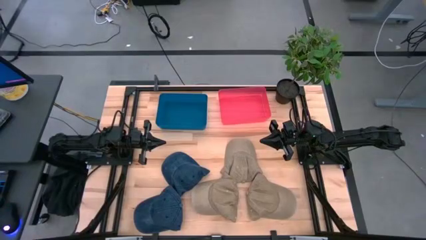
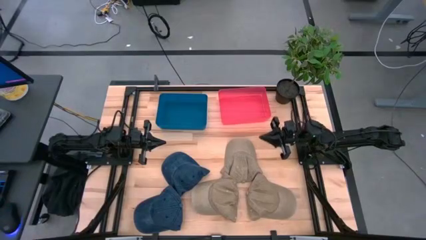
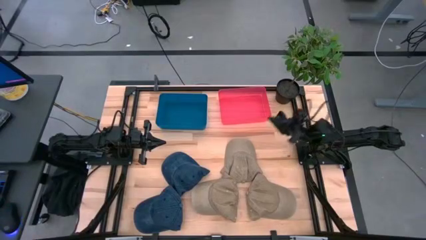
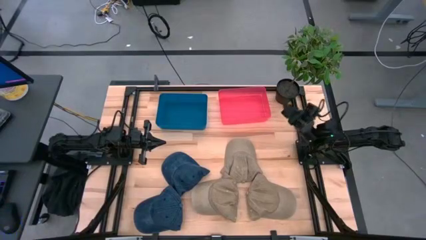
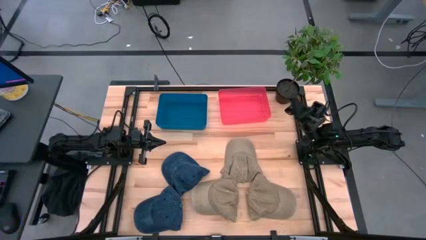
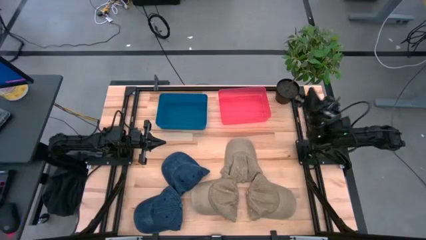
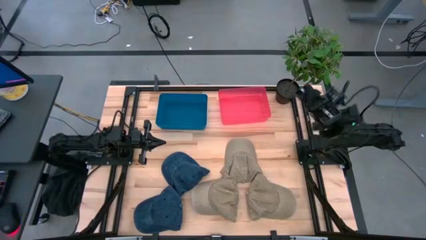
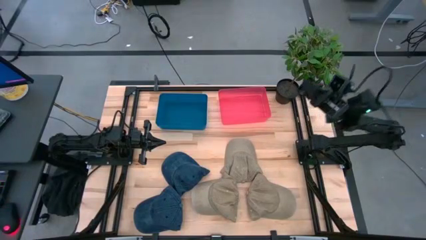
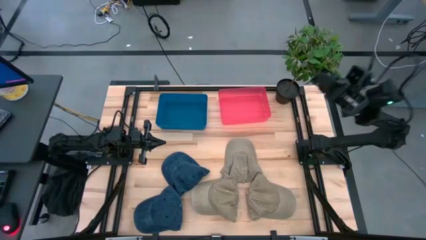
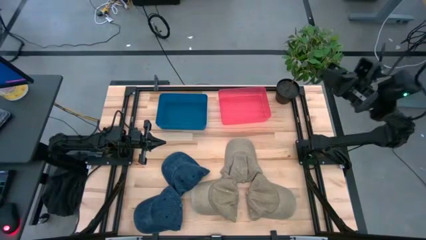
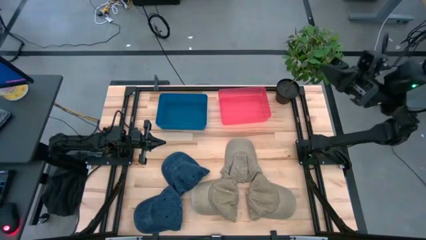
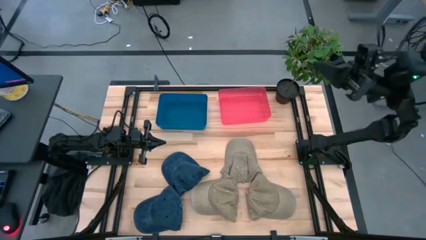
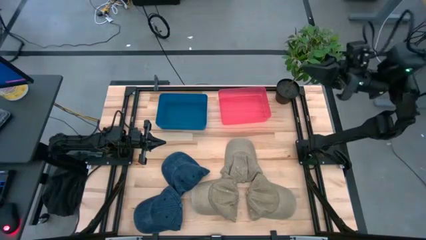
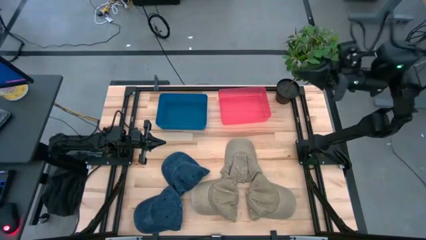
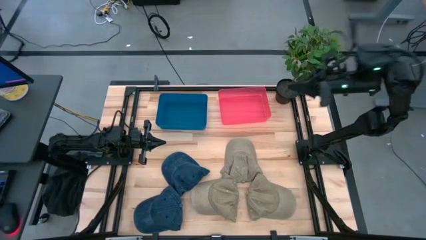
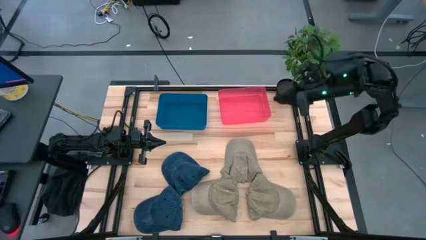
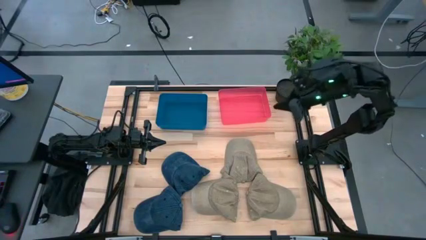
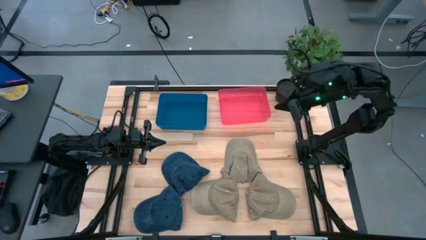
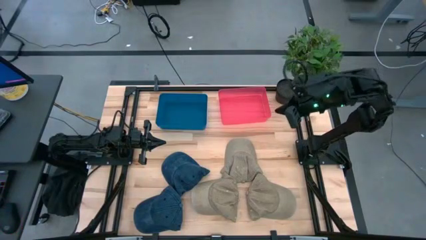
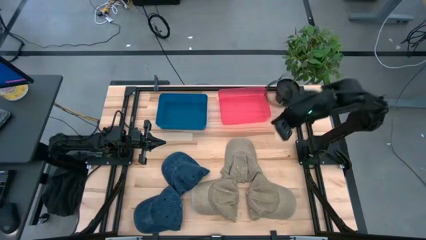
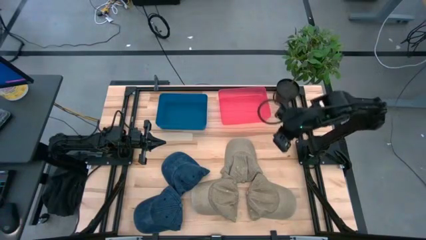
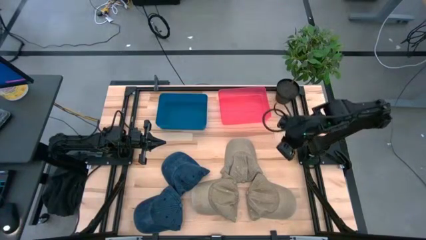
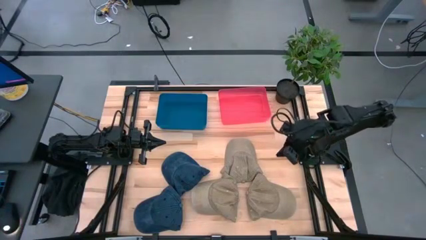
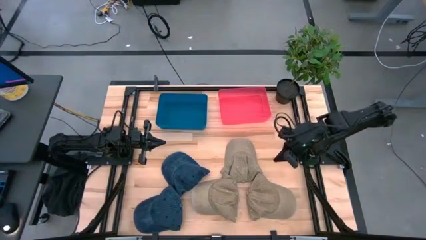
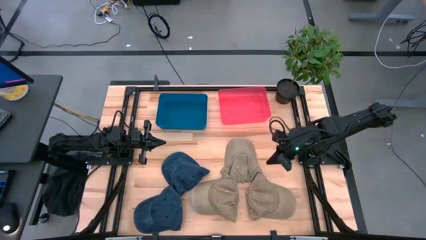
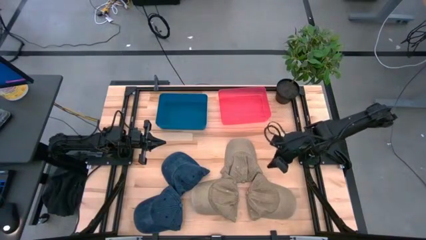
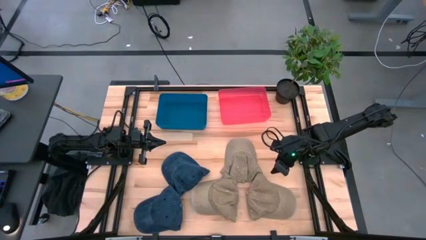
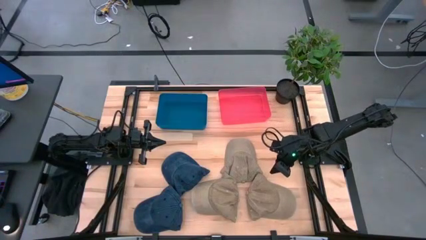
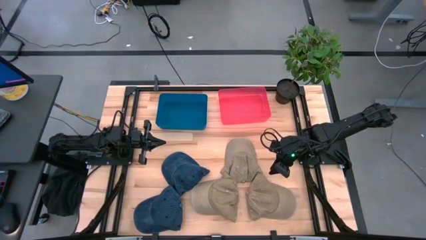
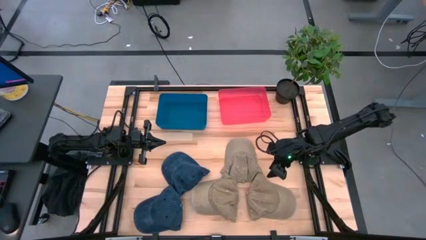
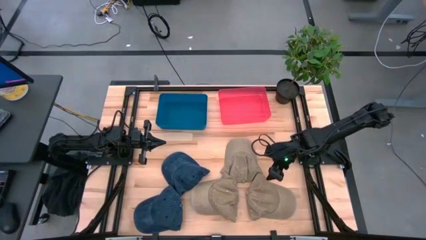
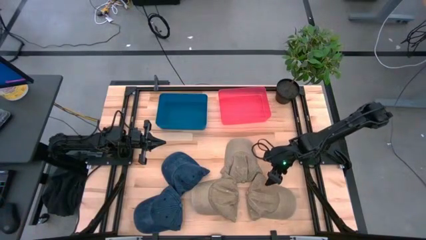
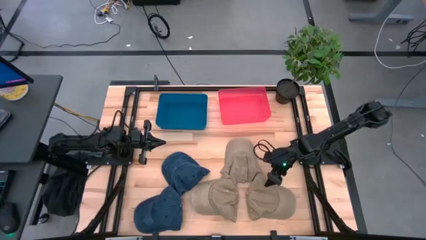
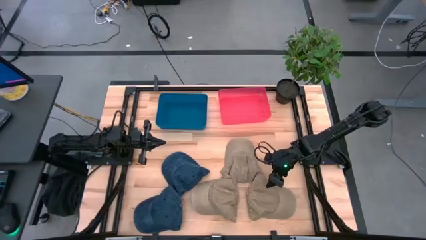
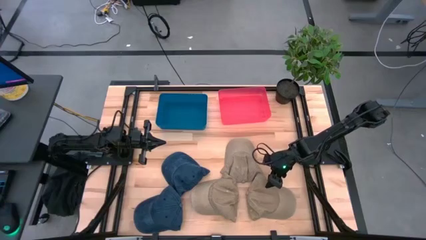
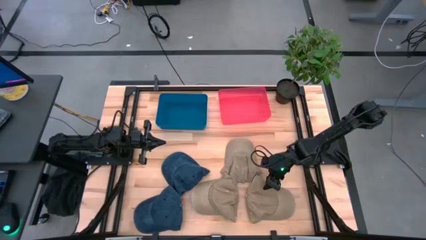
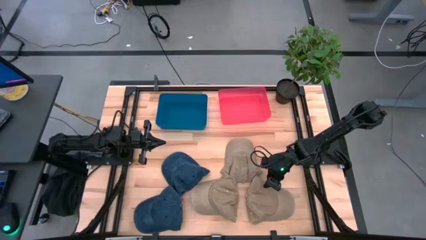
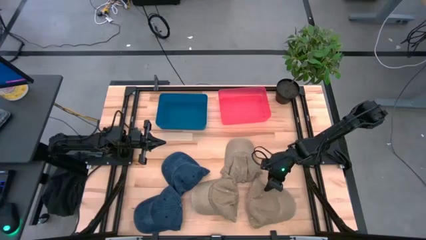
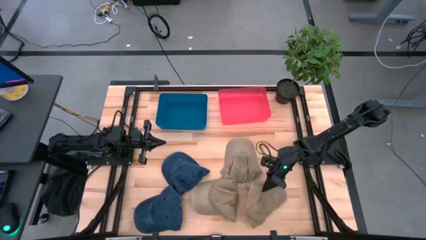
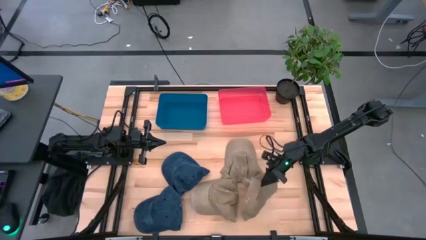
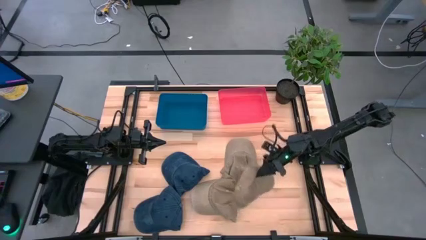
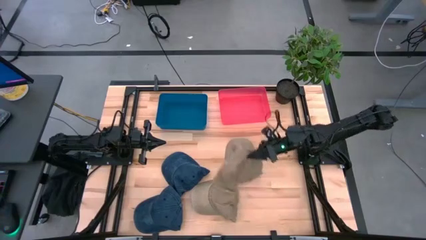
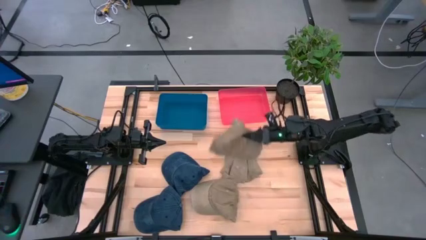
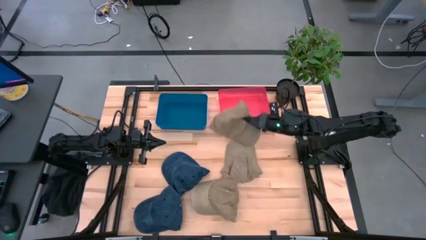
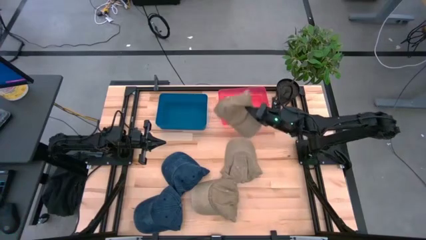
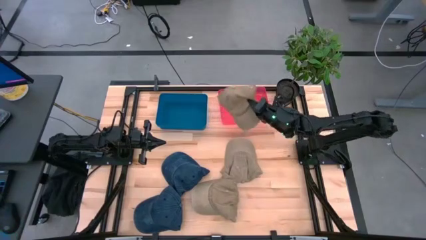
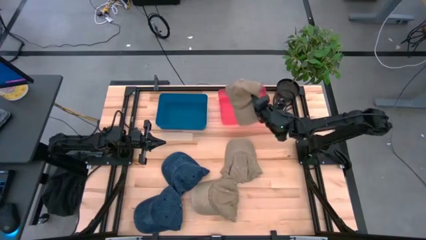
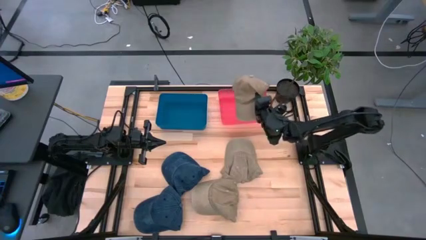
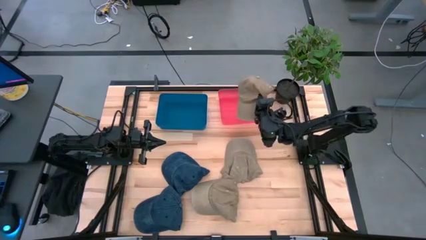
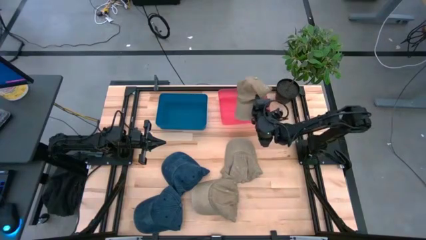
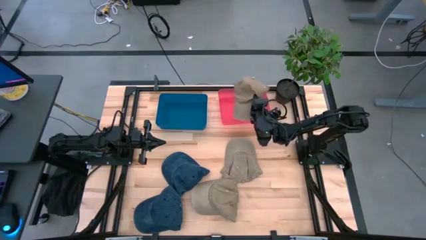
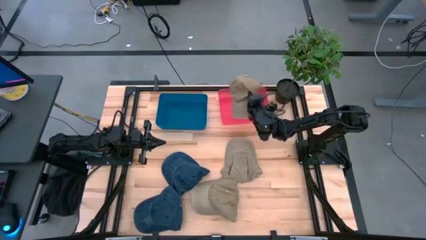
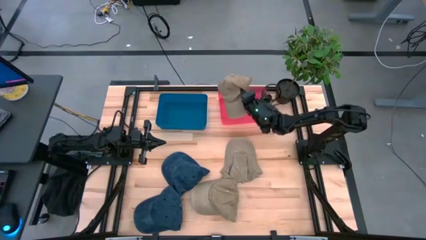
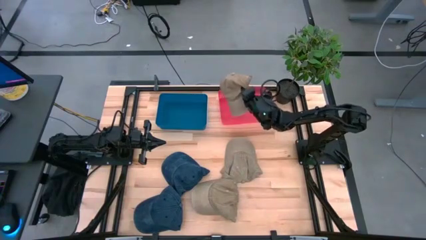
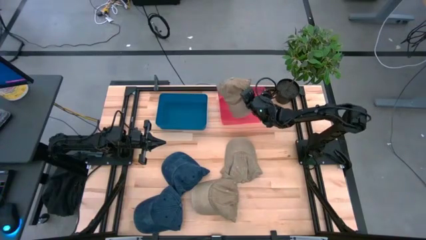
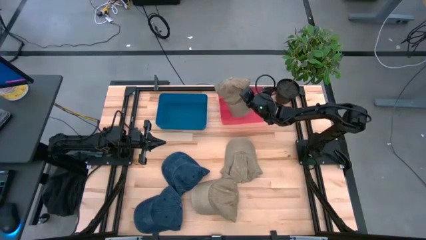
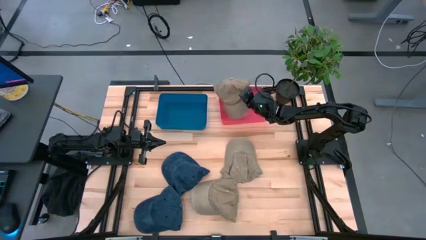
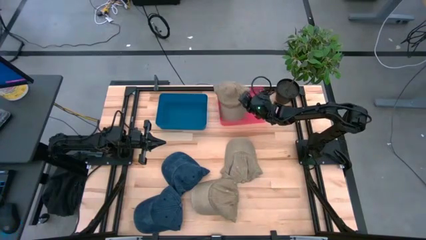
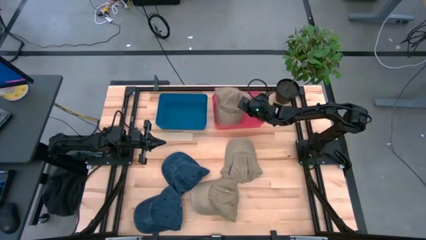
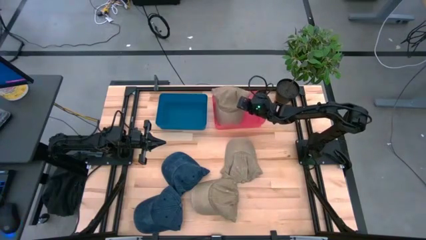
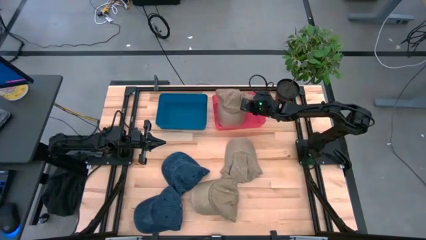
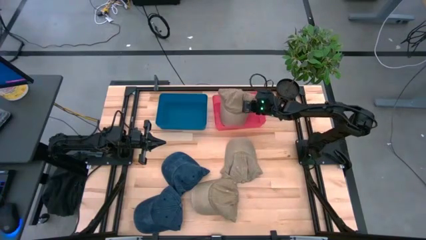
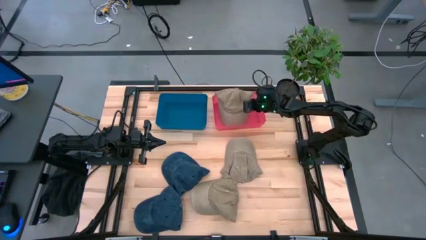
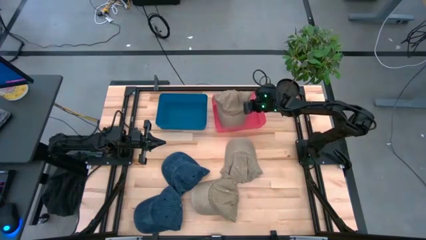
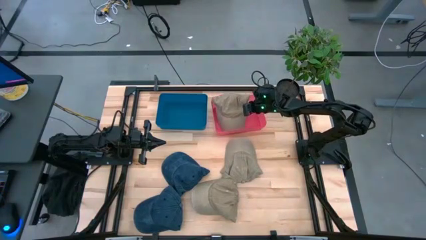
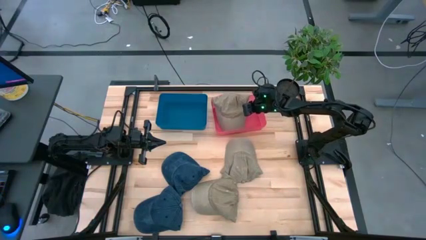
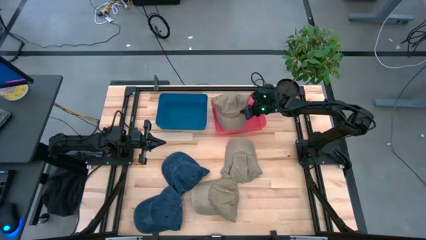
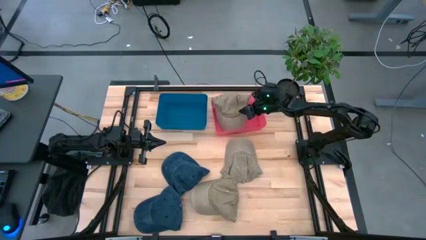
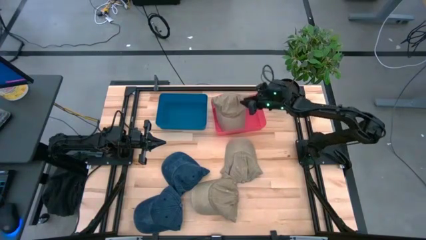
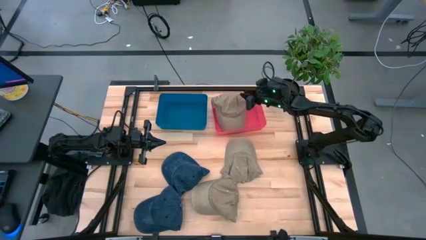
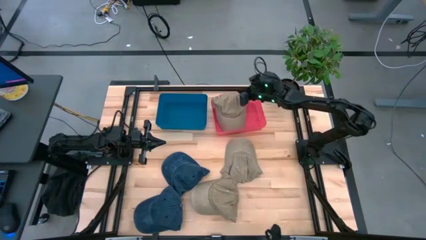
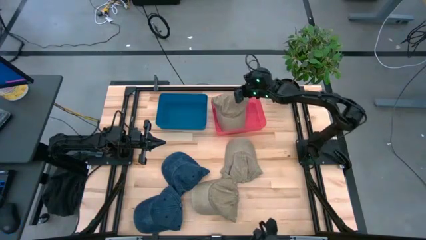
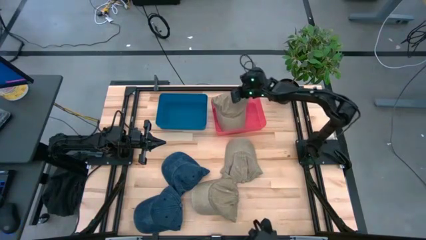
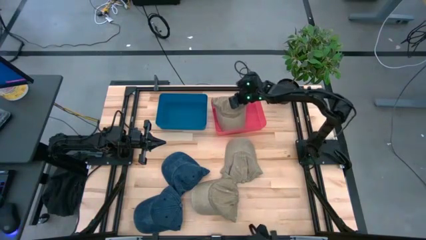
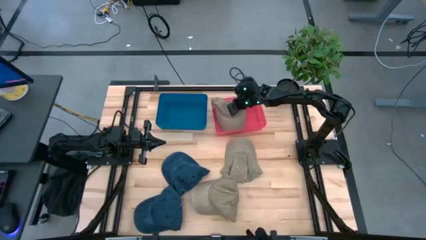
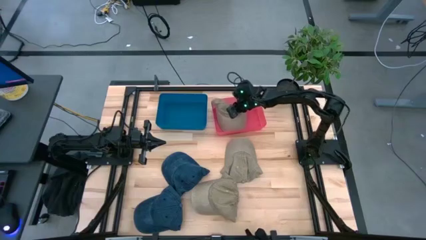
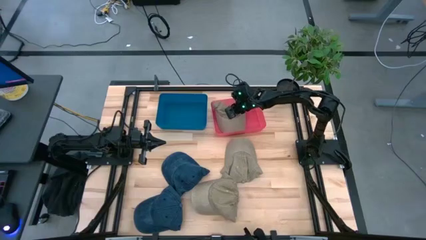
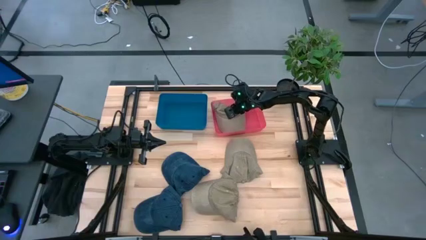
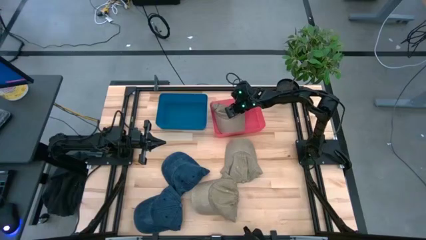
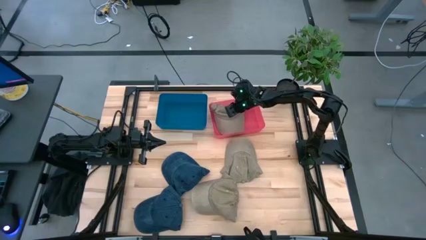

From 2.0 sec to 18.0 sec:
Task: Pick & Place hat
Put the bottom right brown cap into the pink bin
